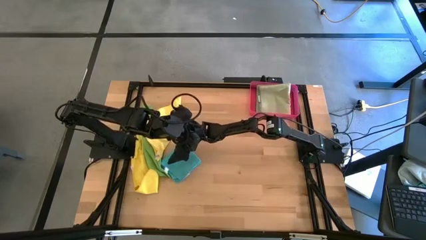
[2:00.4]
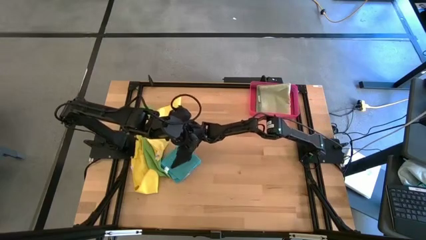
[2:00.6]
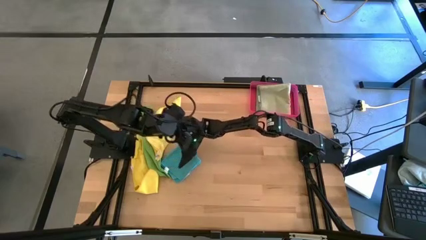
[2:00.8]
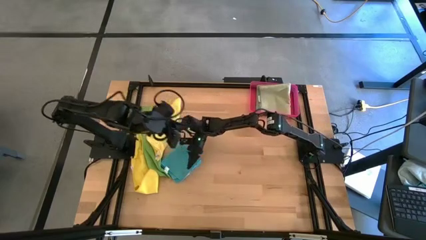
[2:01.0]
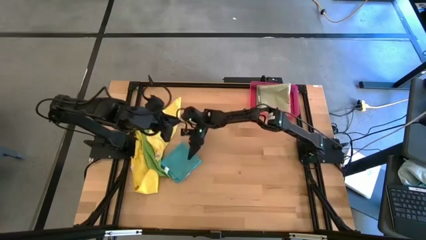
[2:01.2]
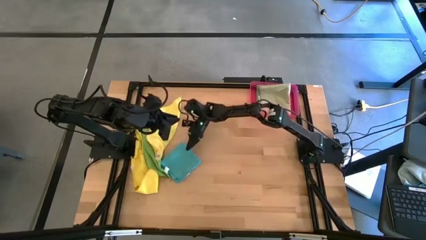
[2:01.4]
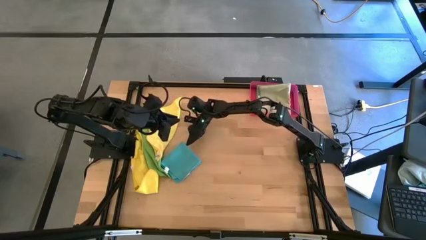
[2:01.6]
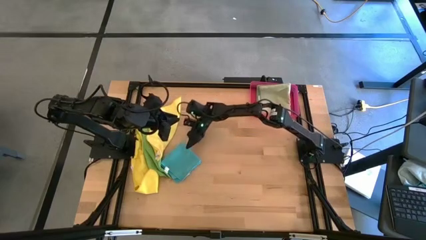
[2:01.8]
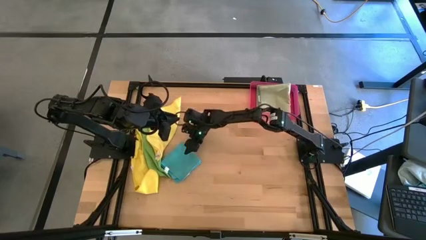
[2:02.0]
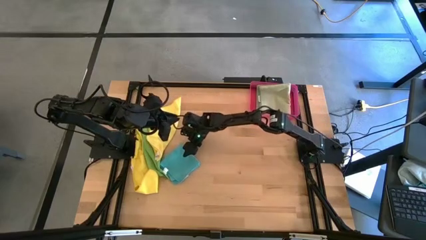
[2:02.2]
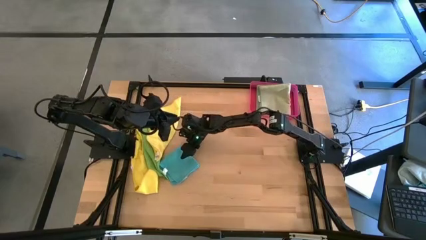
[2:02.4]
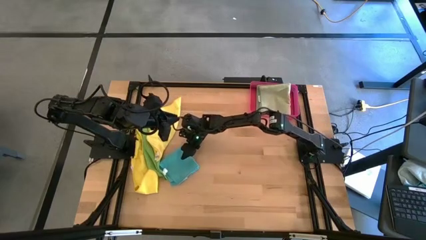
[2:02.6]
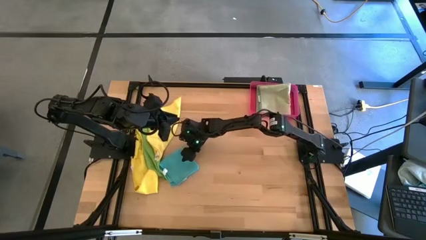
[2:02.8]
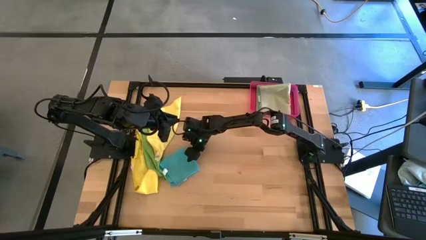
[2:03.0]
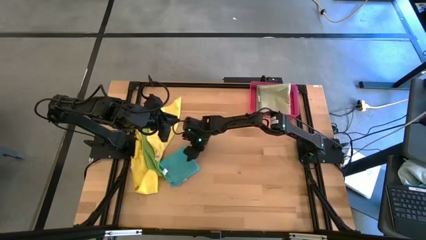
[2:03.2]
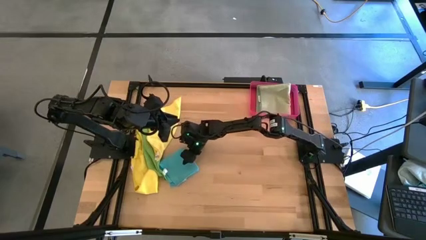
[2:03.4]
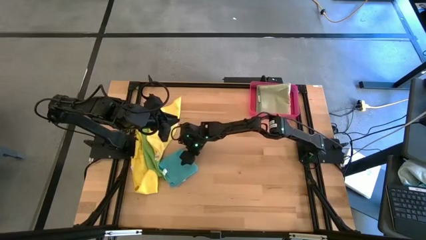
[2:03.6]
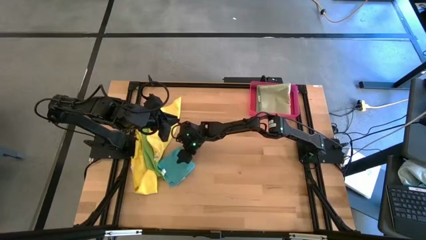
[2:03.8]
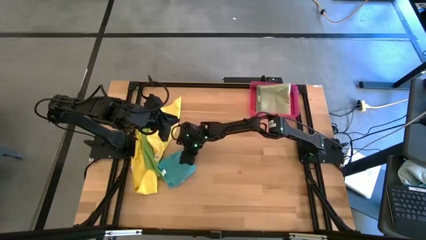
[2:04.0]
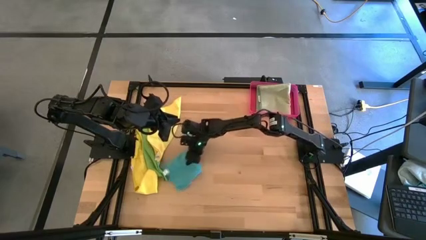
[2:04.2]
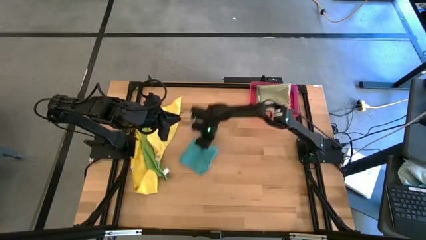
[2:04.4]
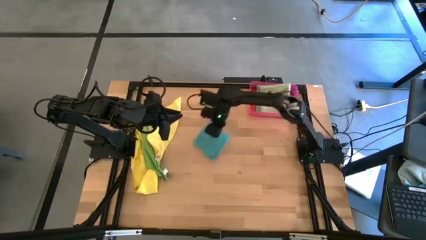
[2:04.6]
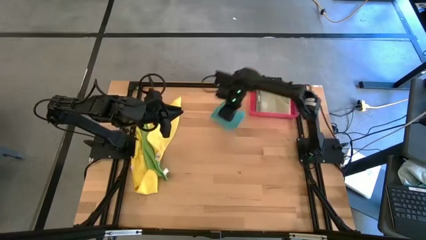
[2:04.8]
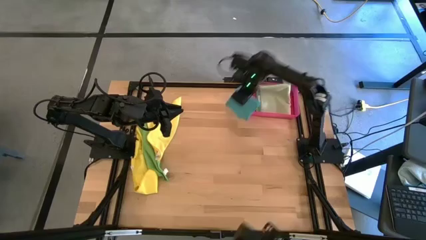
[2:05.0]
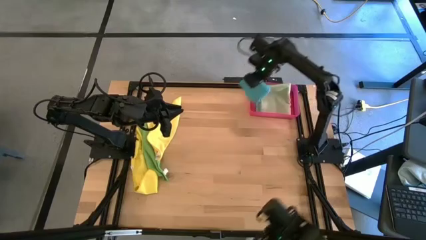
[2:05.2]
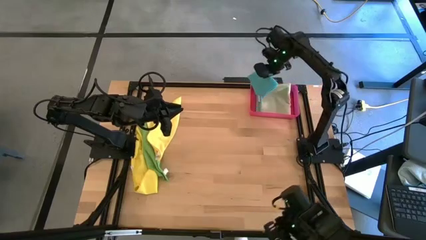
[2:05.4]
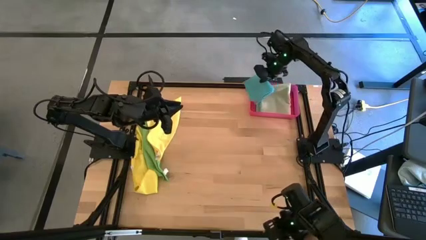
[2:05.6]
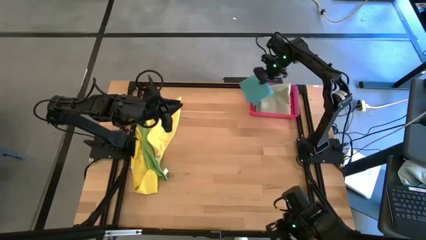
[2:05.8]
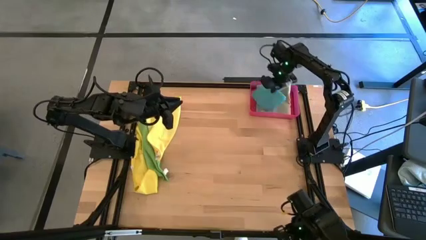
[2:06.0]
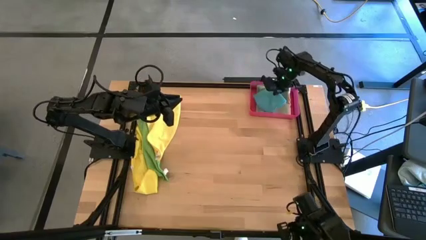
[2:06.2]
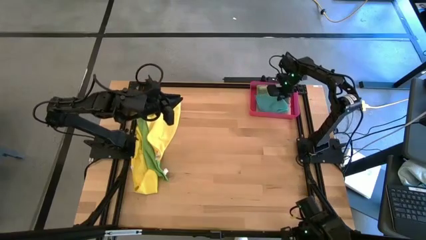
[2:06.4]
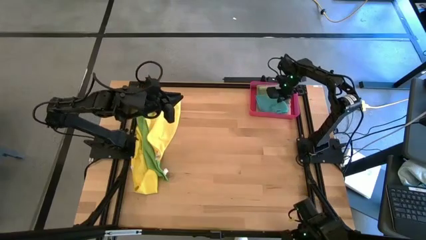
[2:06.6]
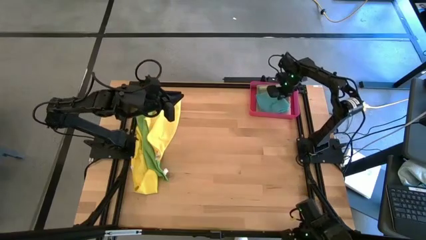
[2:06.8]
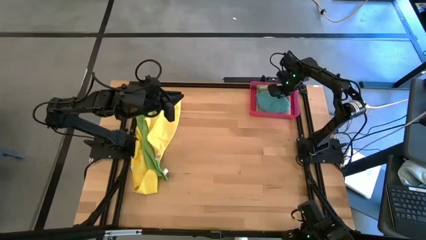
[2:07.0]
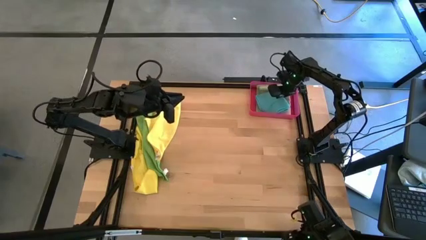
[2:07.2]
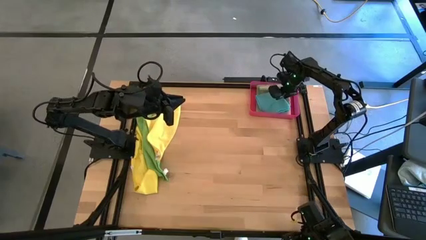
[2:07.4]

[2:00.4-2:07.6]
Task: Fold microfiber towels
Put the blue towel into the red bin

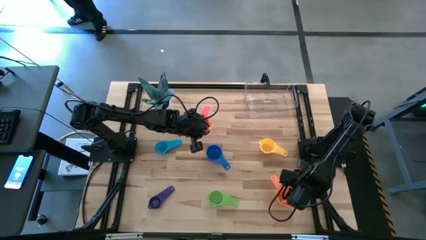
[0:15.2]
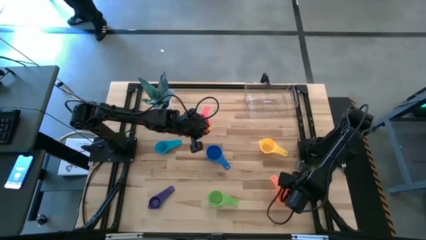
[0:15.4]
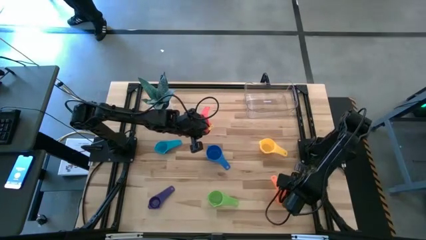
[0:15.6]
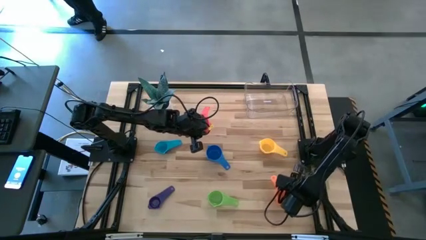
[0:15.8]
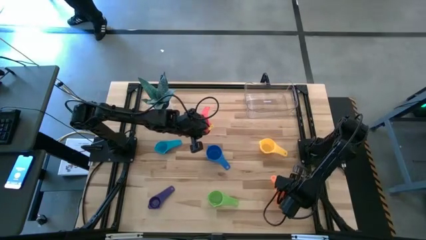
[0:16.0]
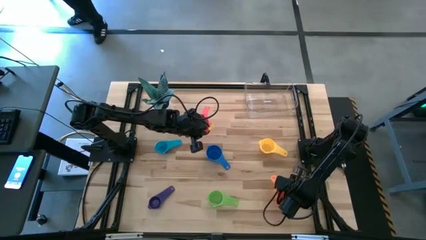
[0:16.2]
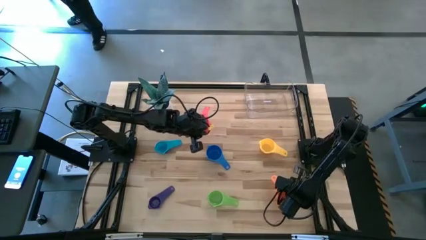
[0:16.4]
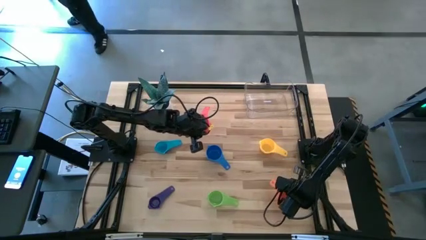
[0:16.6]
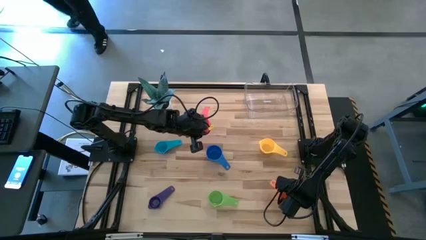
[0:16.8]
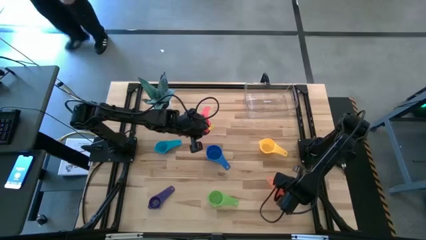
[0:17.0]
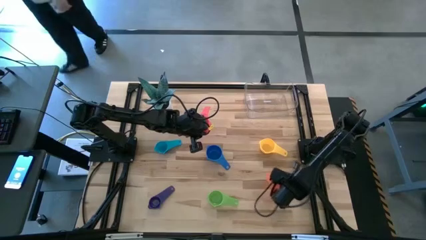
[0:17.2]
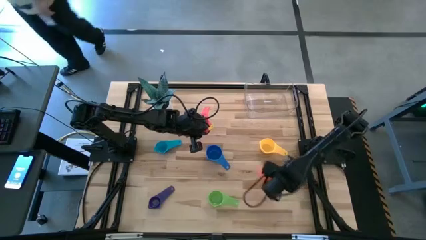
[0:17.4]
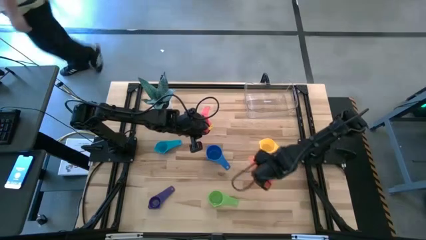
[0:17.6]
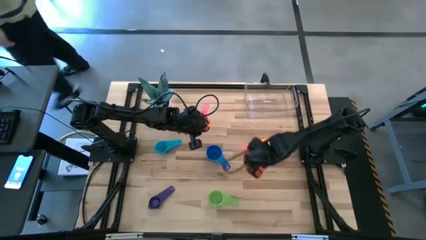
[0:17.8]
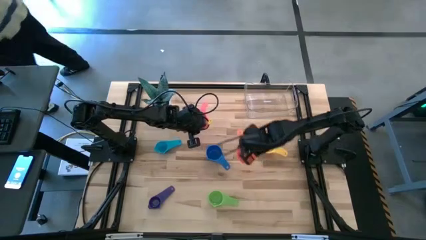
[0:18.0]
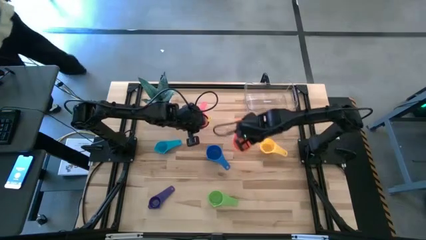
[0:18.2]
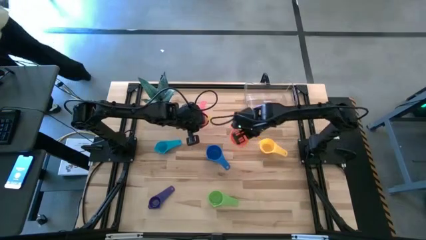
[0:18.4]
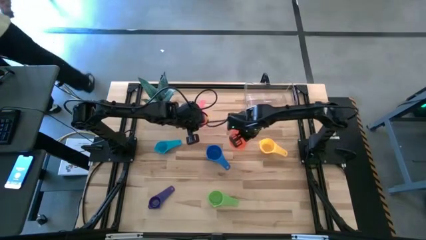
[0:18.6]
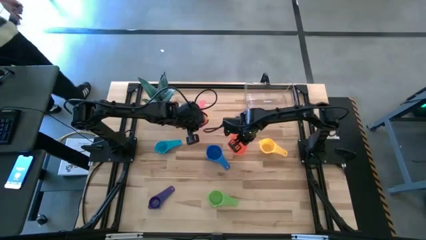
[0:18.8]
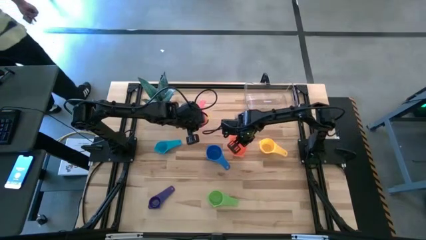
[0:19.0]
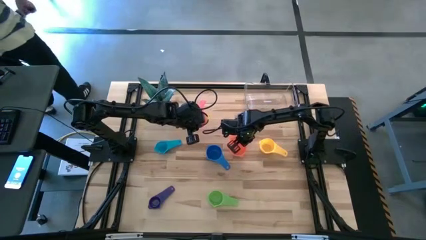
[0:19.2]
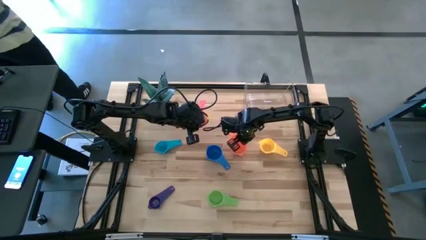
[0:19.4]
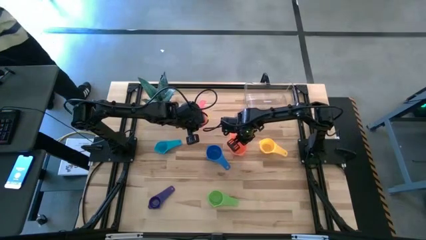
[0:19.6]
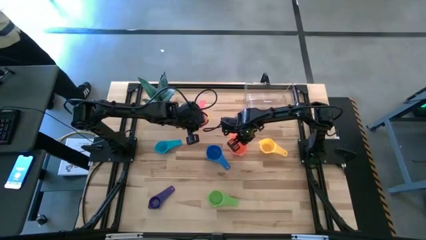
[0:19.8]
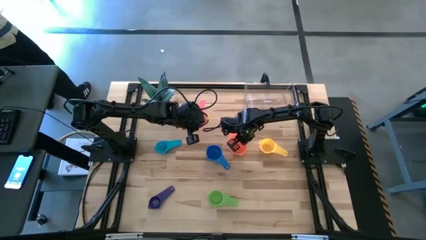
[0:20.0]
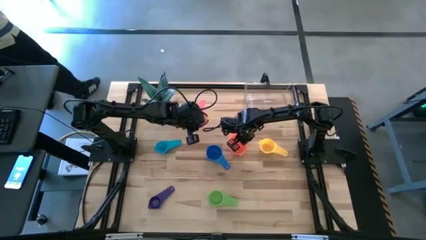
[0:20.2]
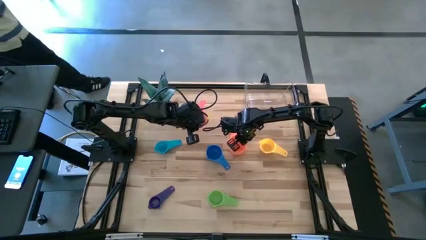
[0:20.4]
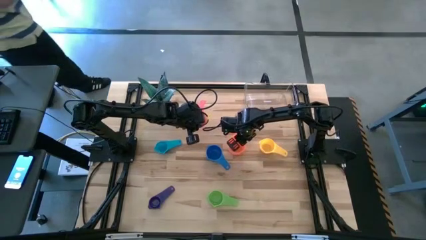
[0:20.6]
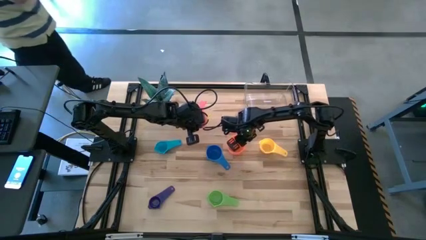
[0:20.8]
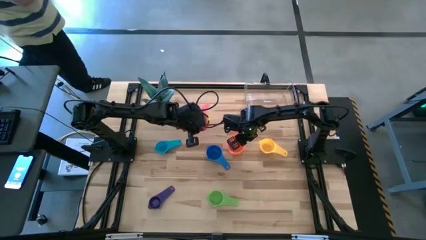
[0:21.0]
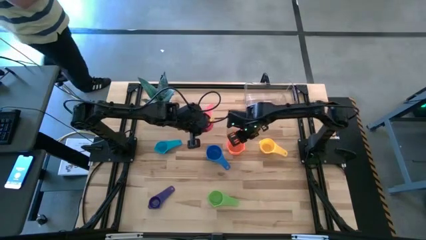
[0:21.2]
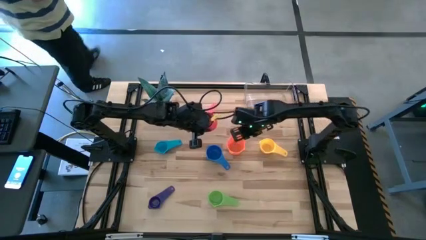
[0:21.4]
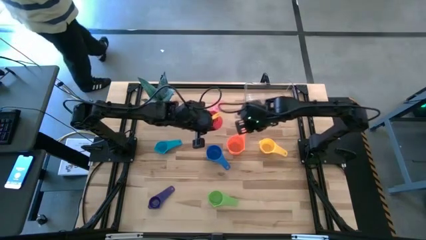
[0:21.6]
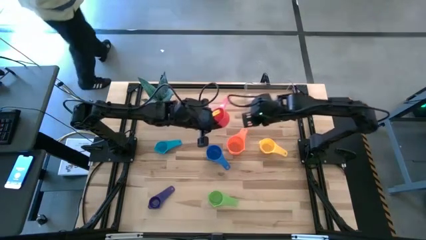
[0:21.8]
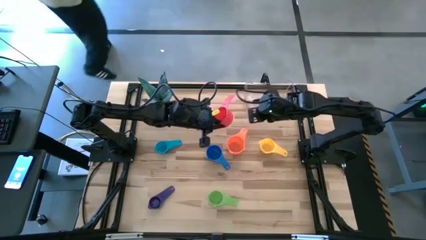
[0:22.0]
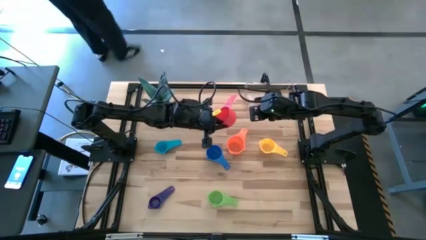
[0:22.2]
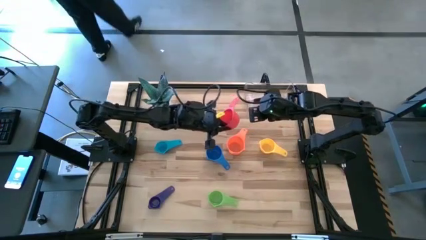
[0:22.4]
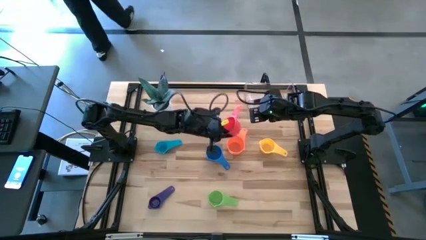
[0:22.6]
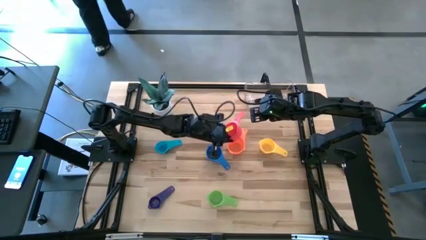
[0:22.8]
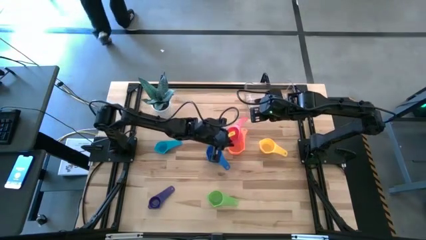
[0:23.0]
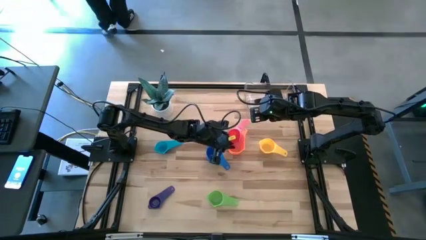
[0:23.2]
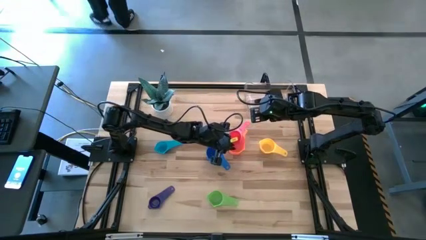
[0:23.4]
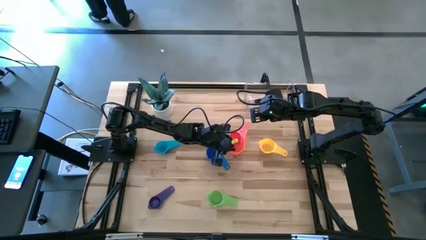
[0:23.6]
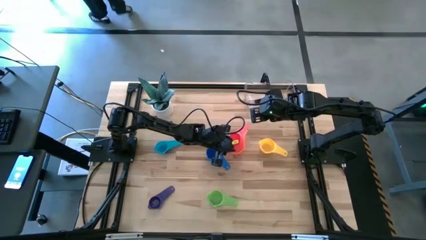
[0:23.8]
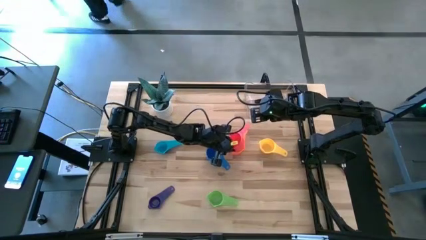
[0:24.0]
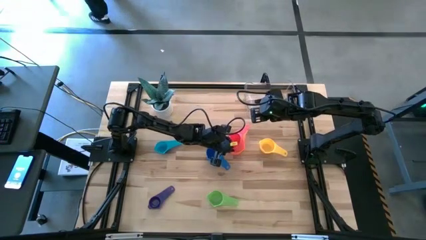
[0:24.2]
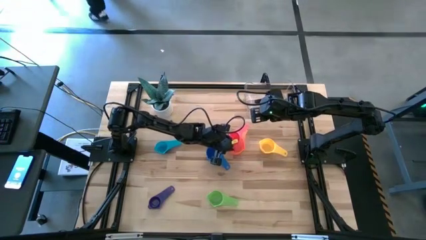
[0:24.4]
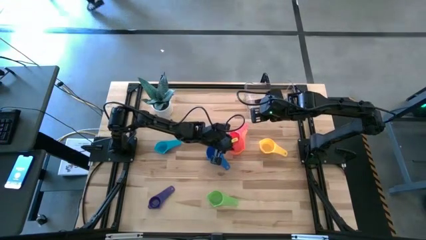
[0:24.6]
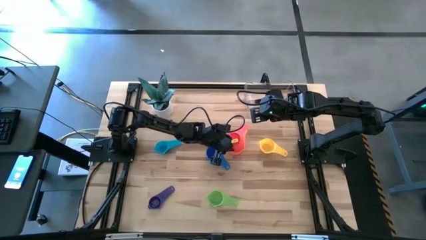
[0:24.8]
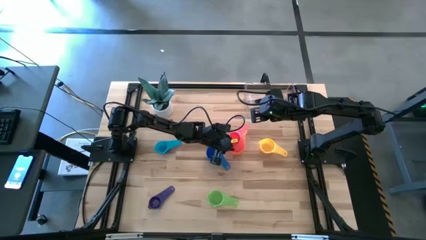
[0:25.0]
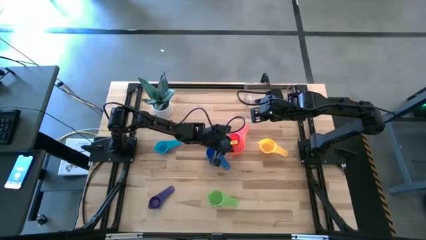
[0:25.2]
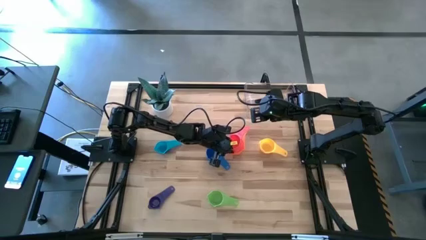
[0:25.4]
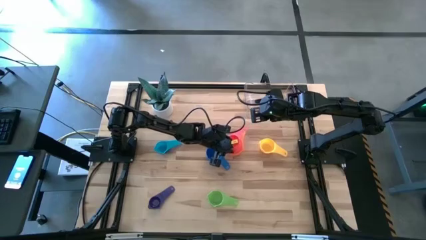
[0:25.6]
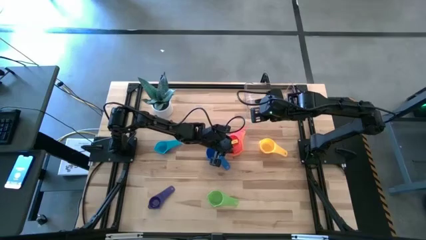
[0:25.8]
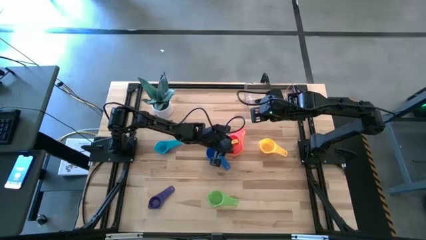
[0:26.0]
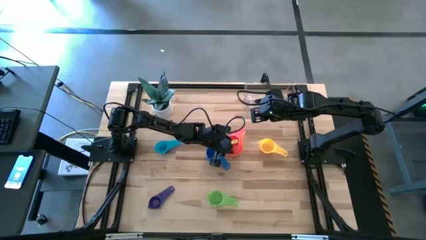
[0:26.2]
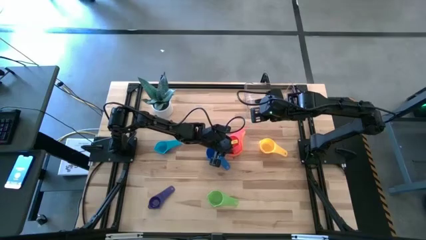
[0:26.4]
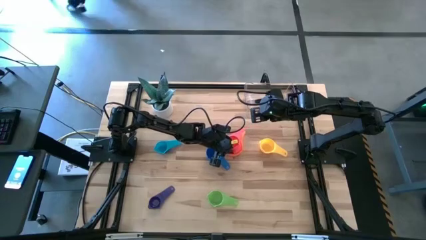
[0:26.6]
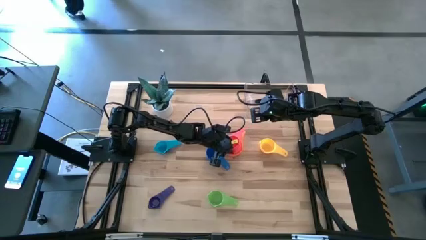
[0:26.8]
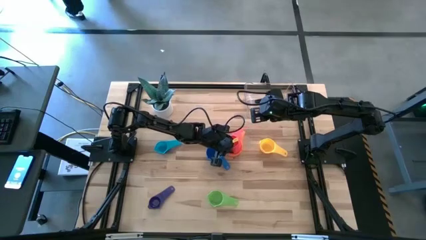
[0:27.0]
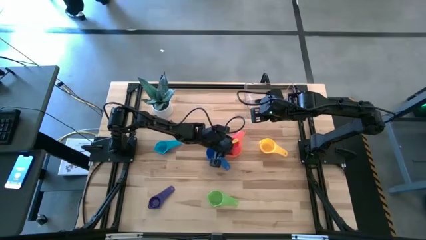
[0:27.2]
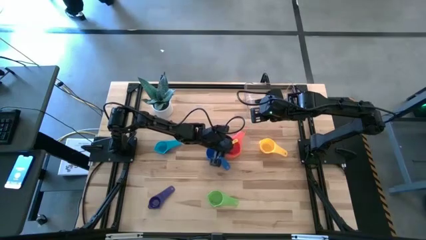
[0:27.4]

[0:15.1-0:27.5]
Task: Nest measuring cups in basket
Stack the red measuring cup on top of the orange measuring cup
